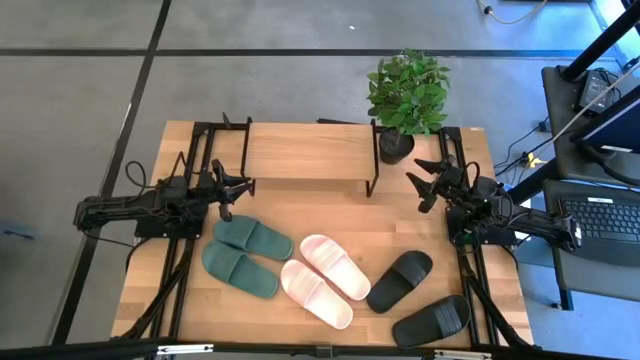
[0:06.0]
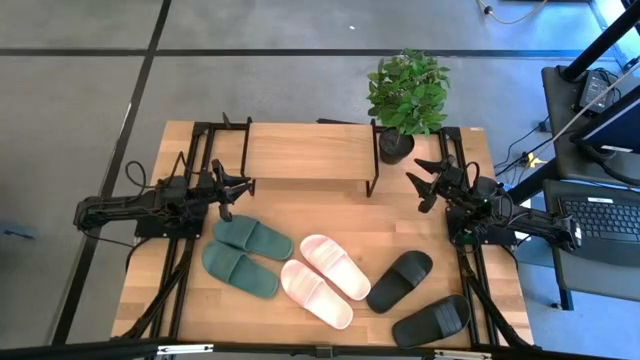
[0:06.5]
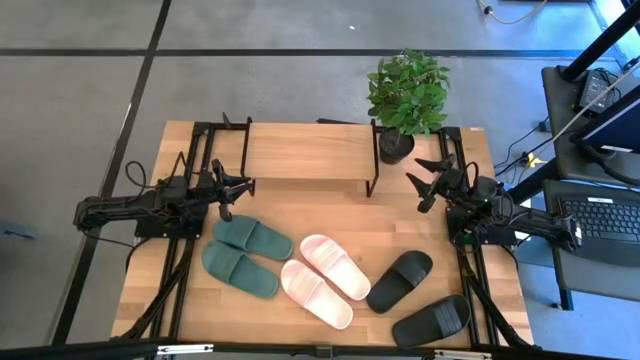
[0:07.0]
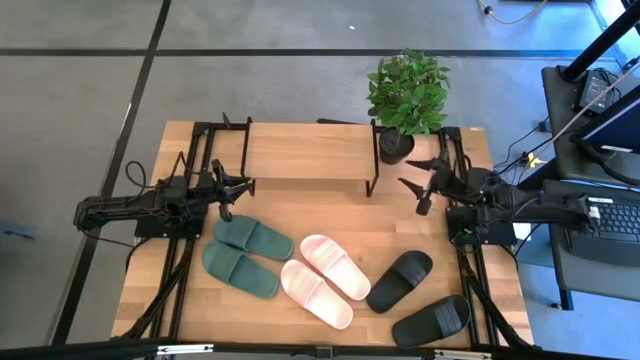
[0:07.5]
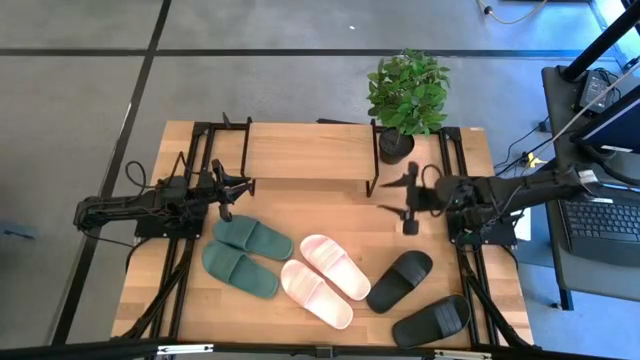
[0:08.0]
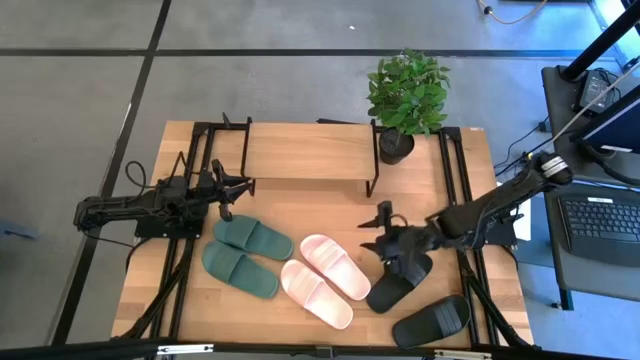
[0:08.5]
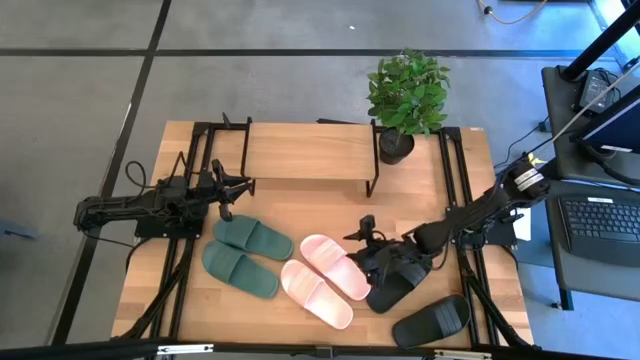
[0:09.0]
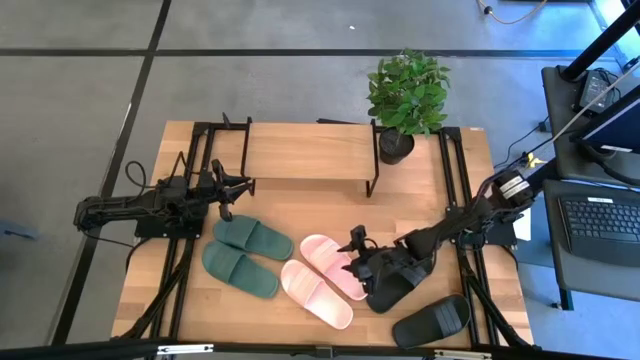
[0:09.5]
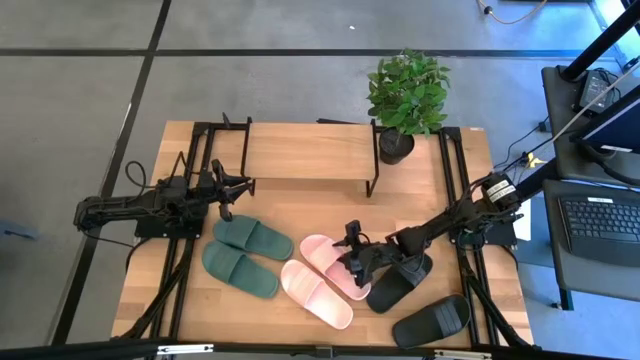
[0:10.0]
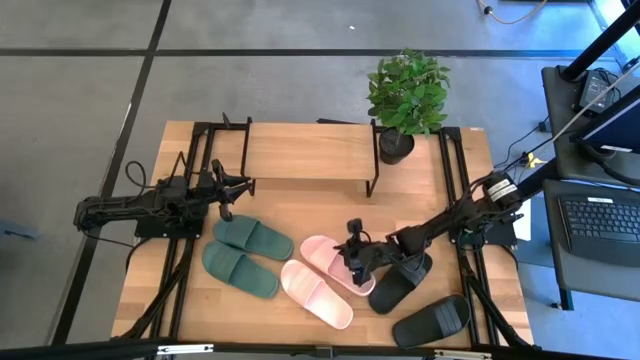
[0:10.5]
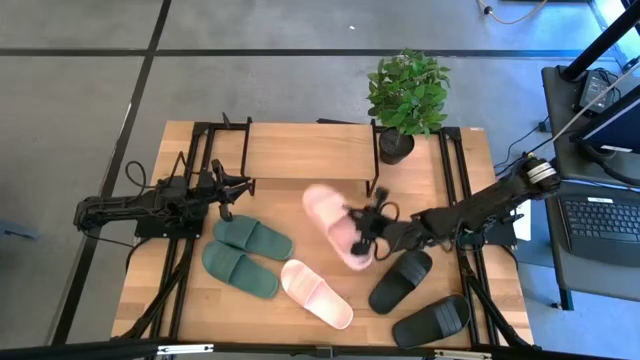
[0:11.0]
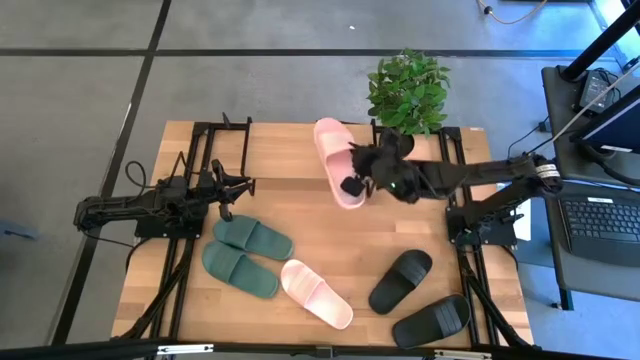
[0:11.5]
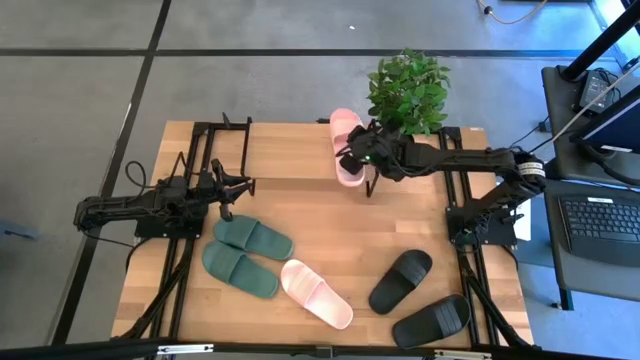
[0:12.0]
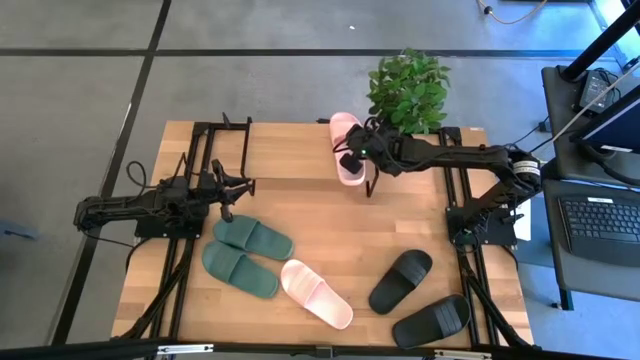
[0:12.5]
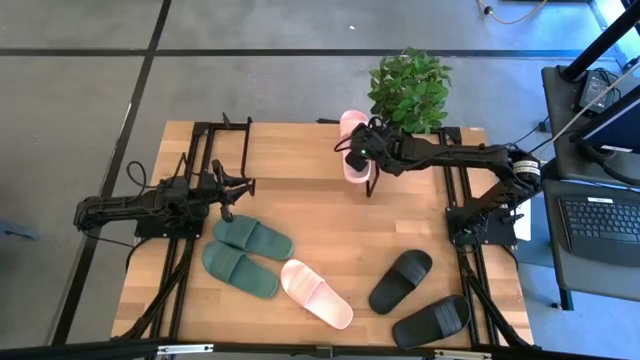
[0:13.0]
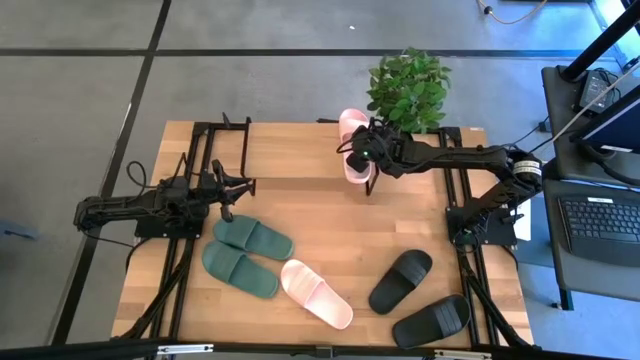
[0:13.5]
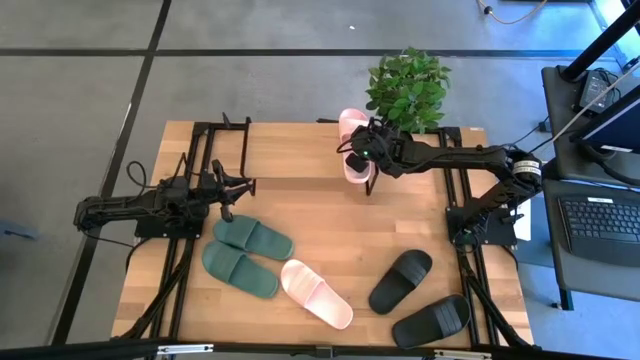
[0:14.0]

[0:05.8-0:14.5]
Task: Pick and place slides into the shelf
Put the right pink slide on the shelf

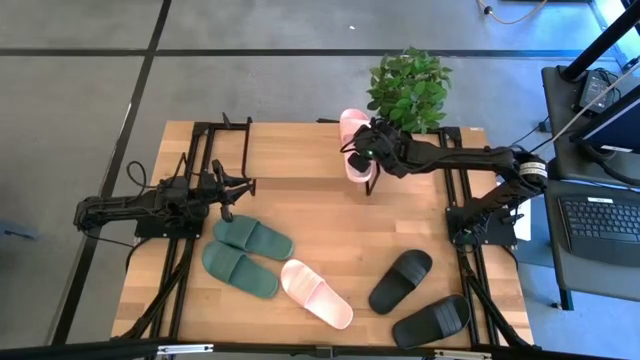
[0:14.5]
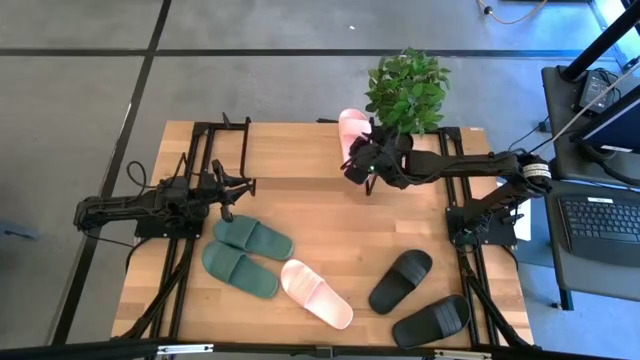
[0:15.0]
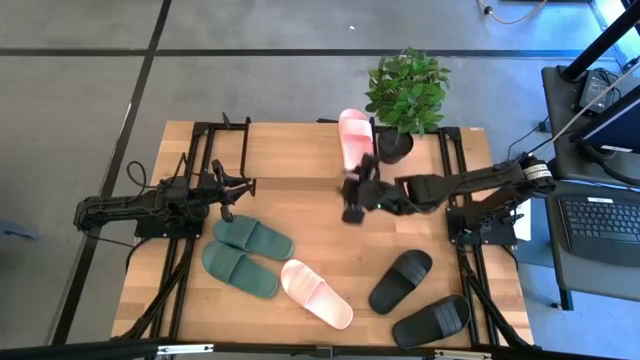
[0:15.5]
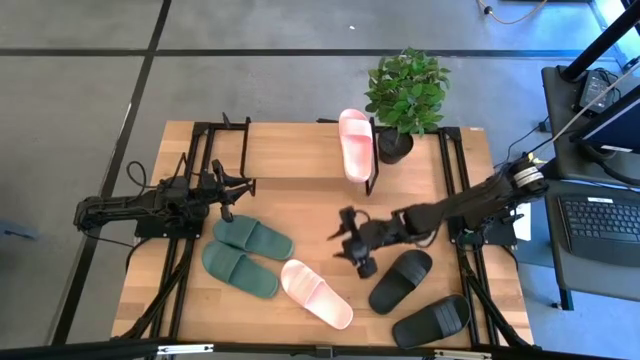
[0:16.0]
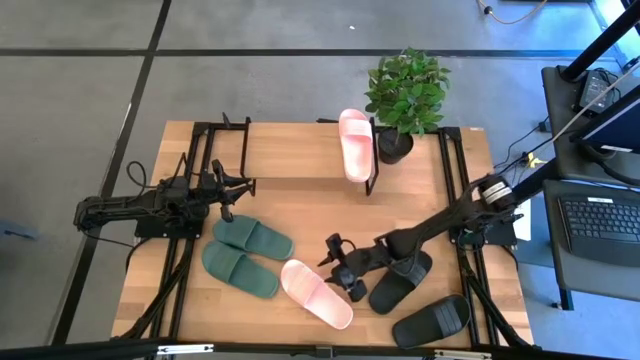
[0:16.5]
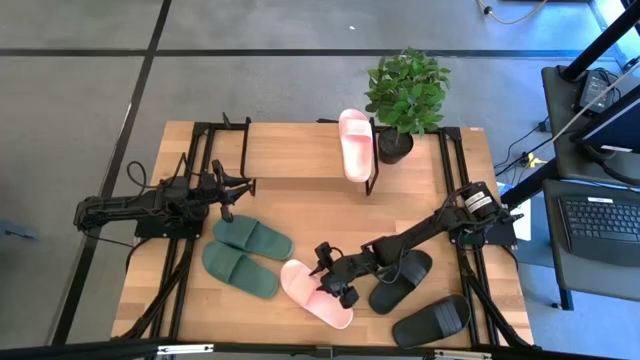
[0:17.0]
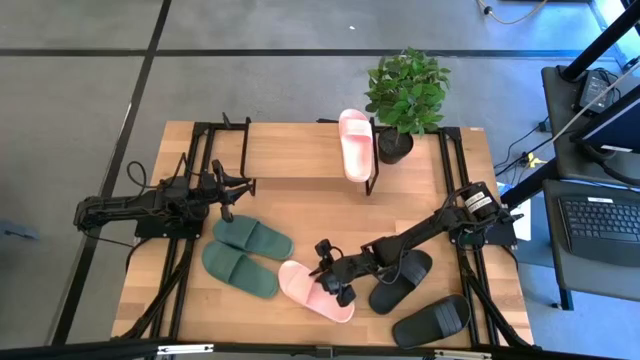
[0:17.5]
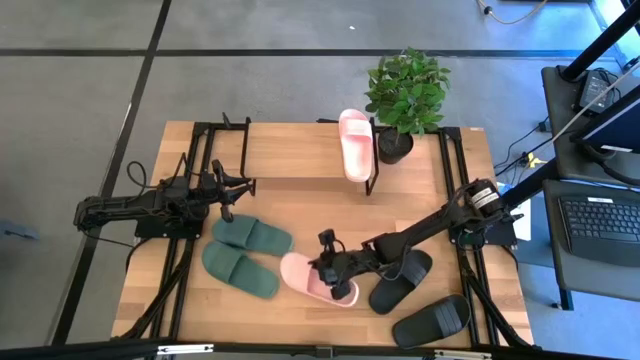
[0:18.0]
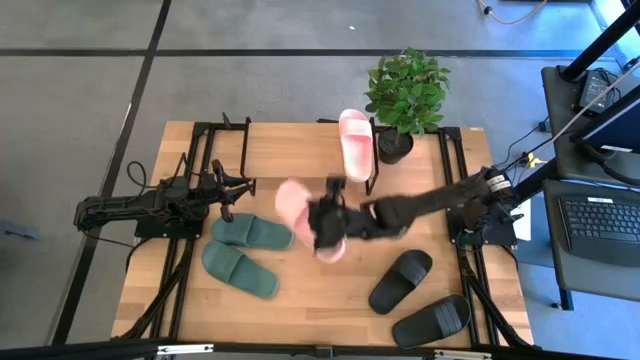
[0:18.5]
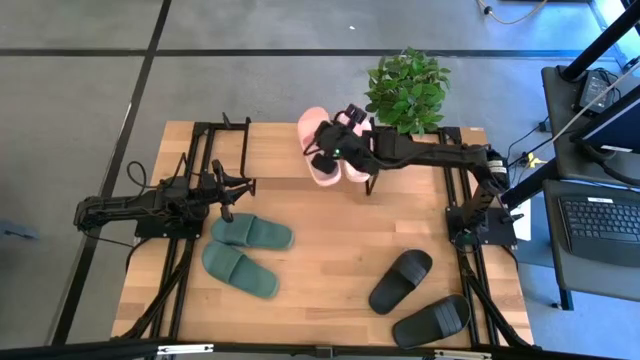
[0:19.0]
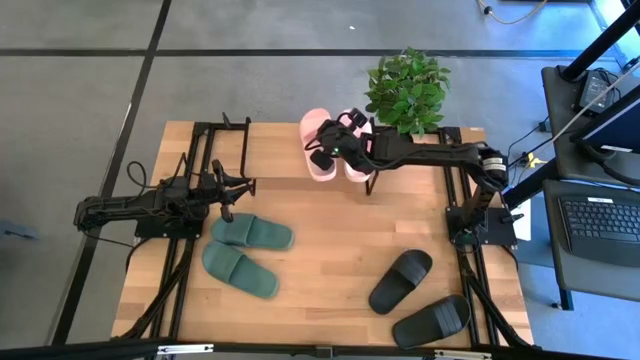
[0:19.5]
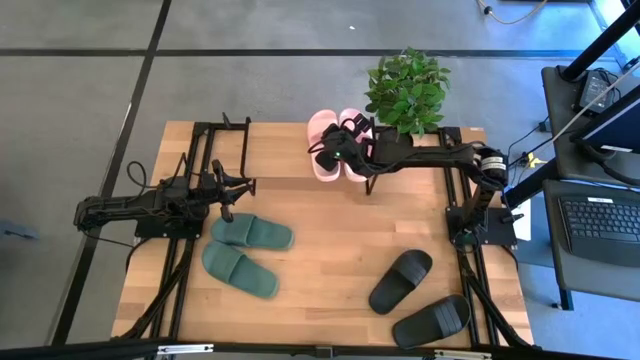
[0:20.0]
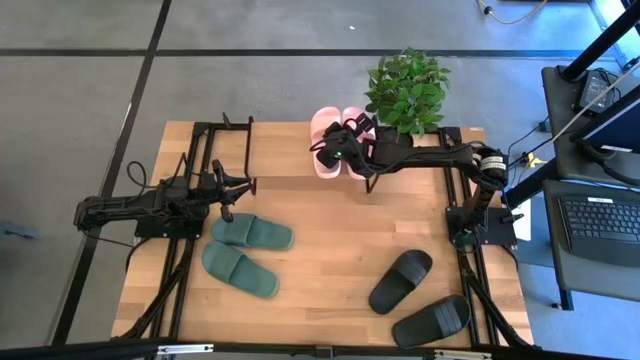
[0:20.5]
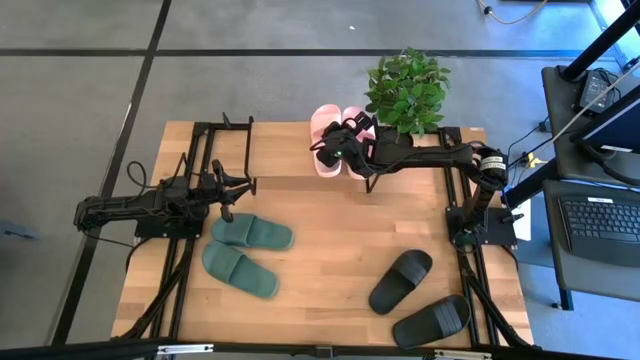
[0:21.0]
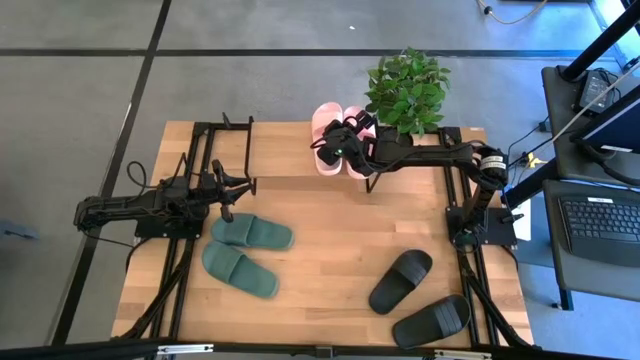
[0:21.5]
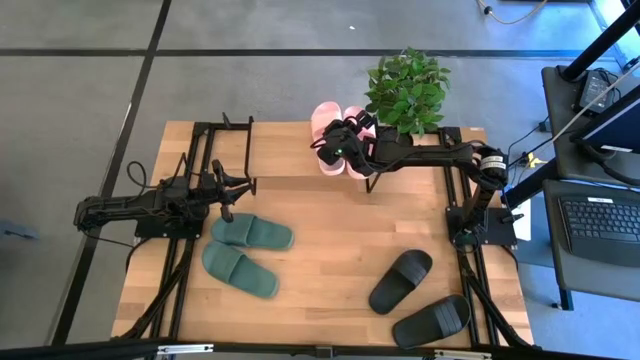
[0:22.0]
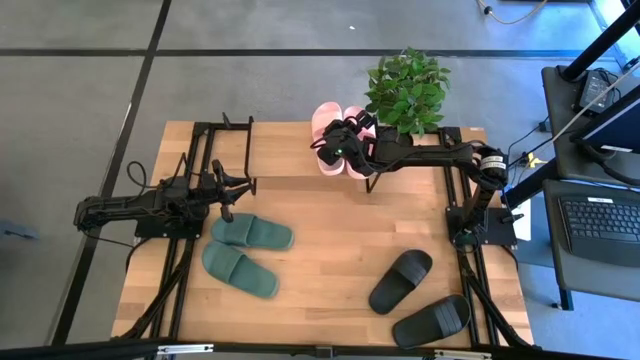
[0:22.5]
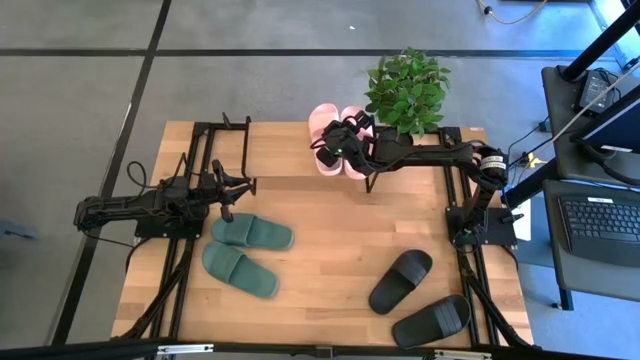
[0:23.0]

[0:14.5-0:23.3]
Put the pink slide on the shelf

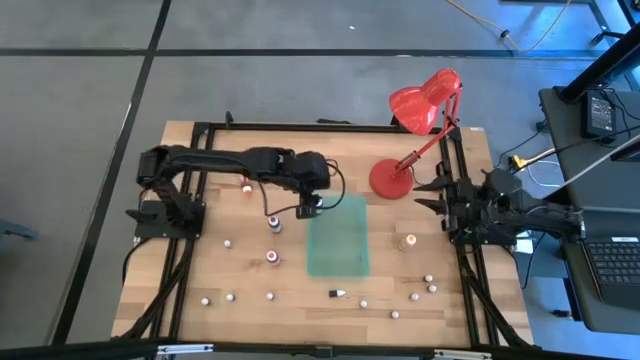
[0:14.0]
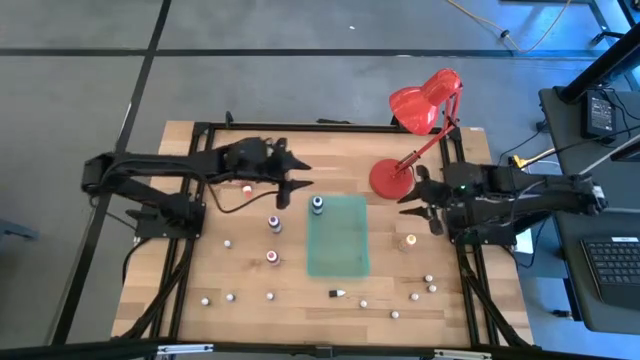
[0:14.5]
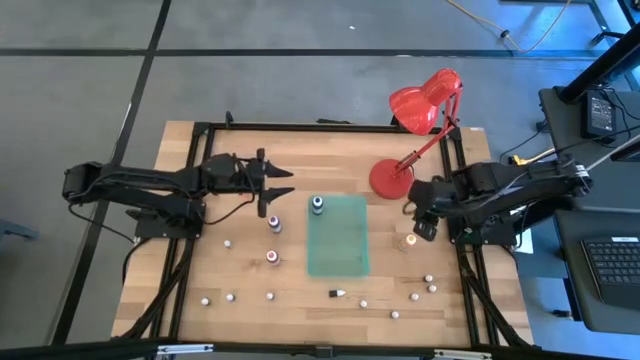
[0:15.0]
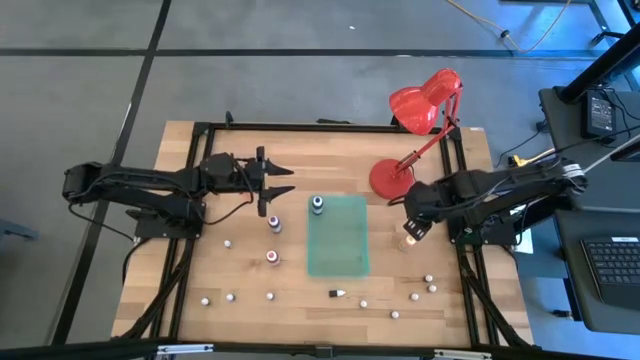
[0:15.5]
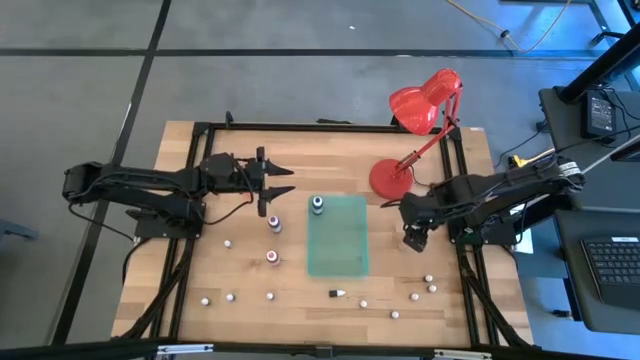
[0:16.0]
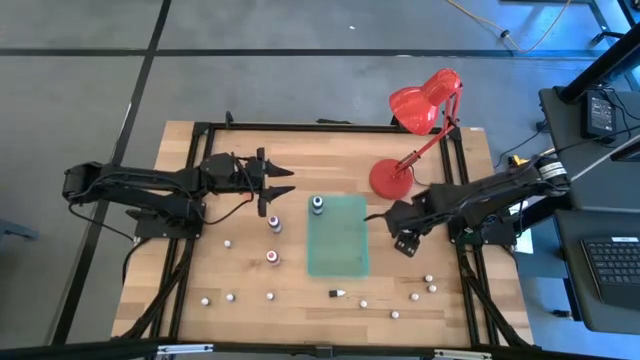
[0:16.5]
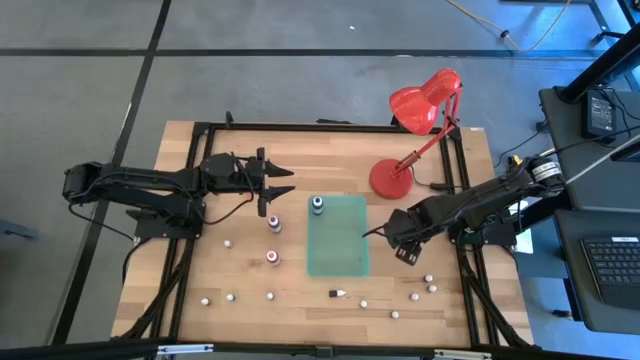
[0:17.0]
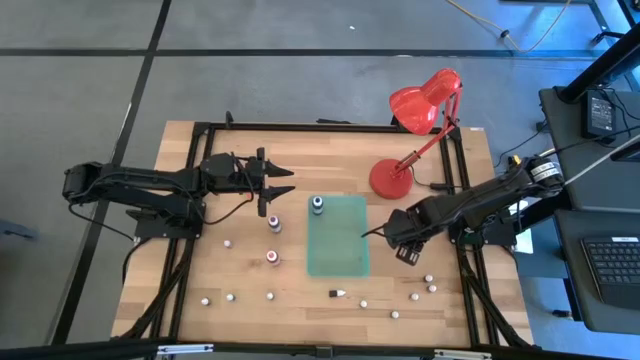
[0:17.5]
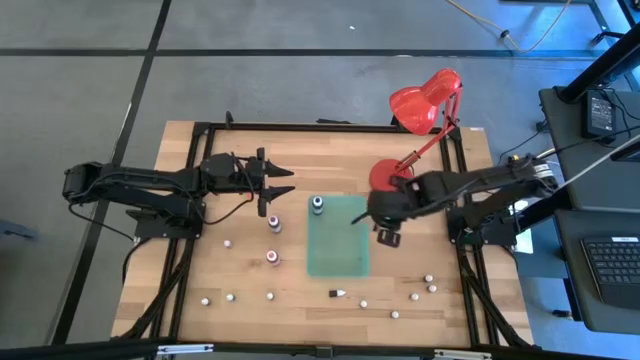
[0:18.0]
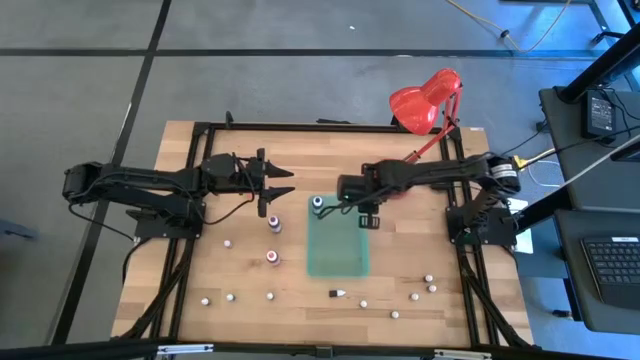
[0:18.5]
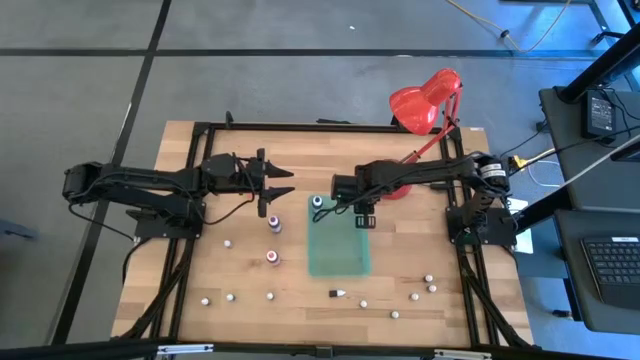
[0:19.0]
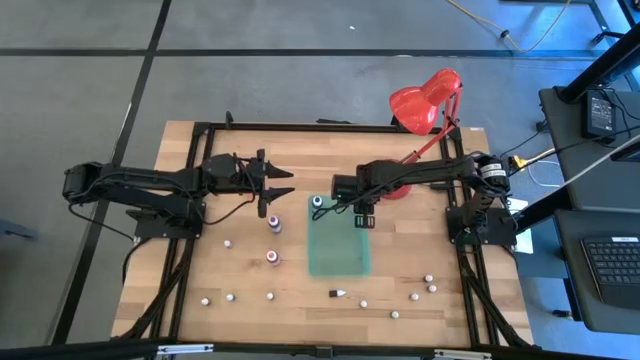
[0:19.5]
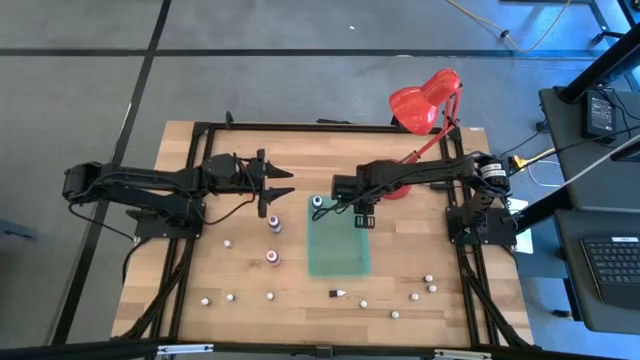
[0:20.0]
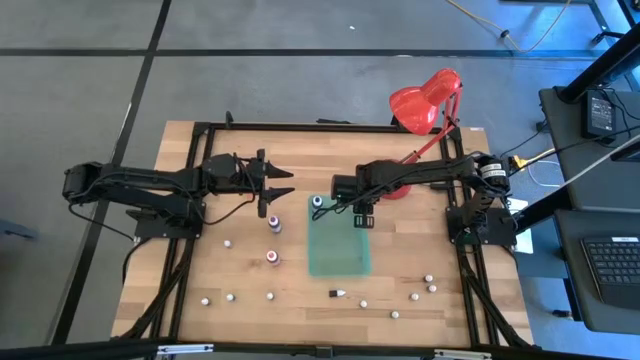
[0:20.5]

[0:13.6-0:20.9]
Task: Pick & Place food coloring
Put the large yellow food coloring bottle into the green bin
